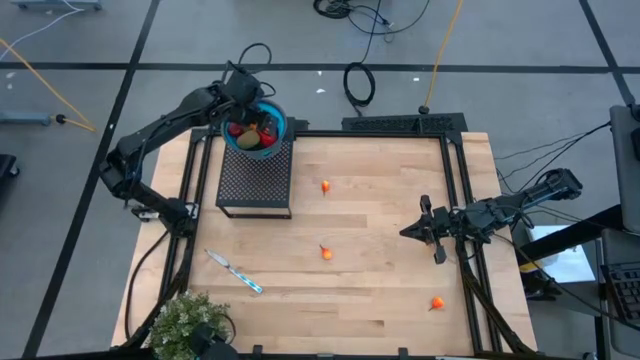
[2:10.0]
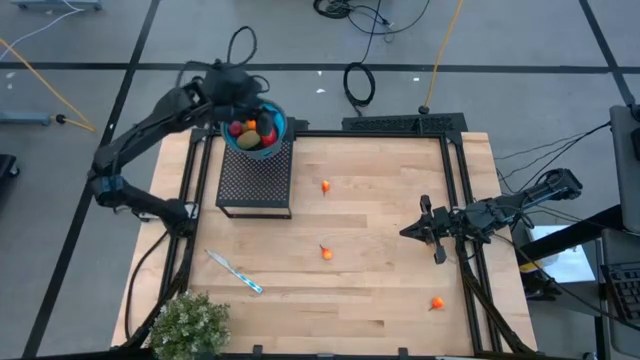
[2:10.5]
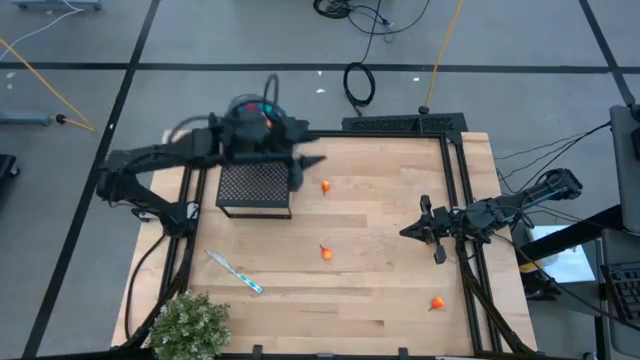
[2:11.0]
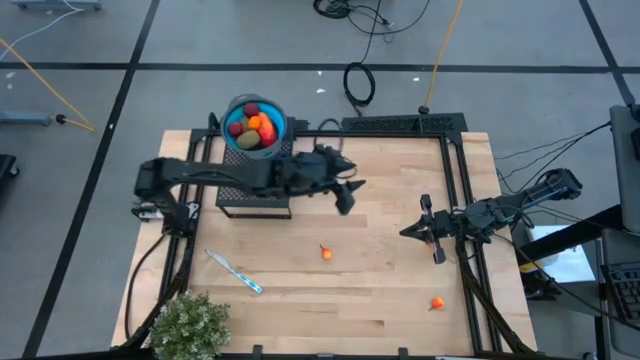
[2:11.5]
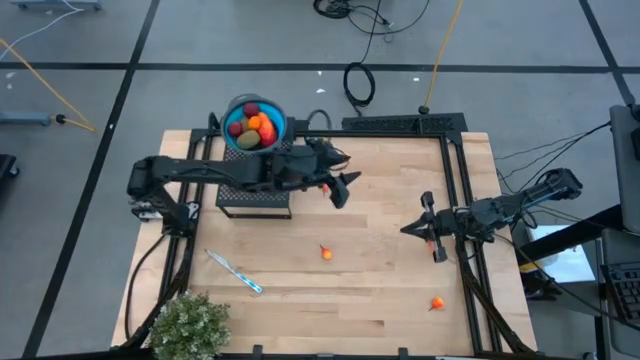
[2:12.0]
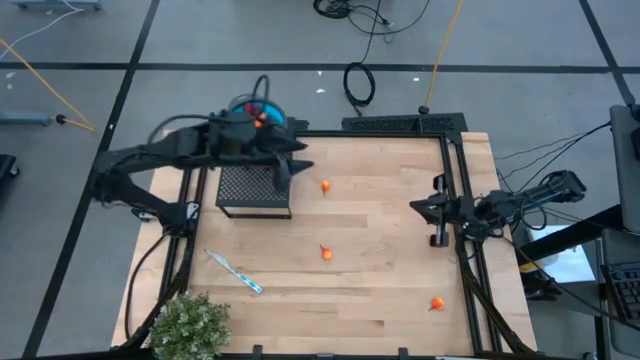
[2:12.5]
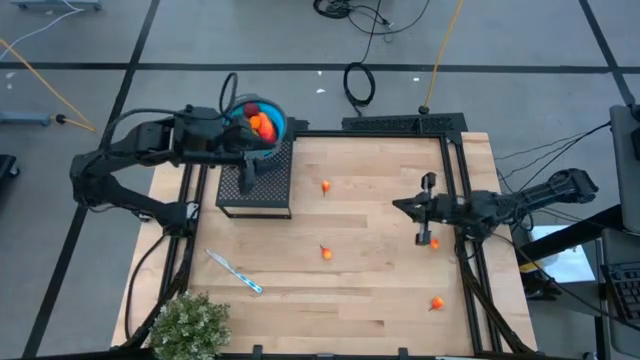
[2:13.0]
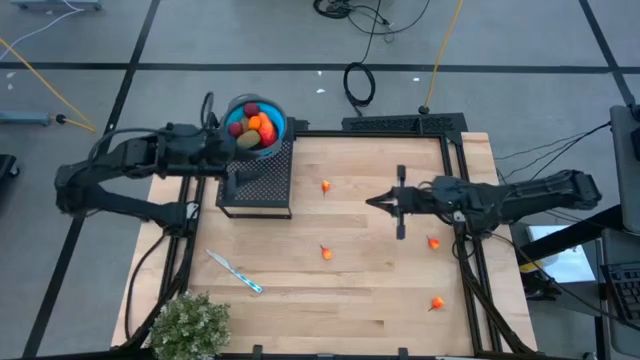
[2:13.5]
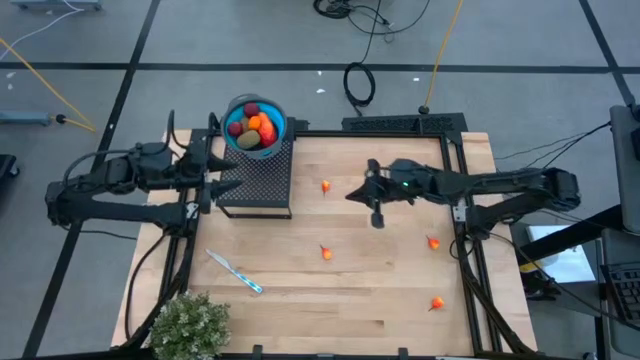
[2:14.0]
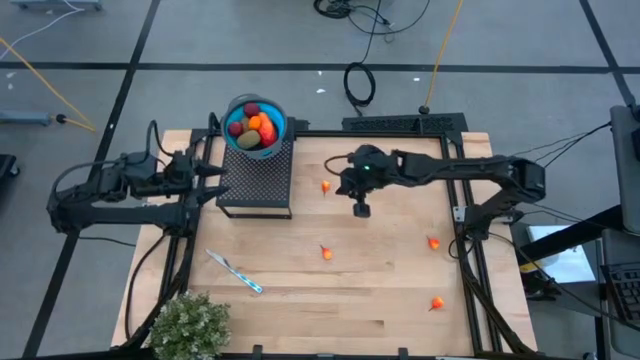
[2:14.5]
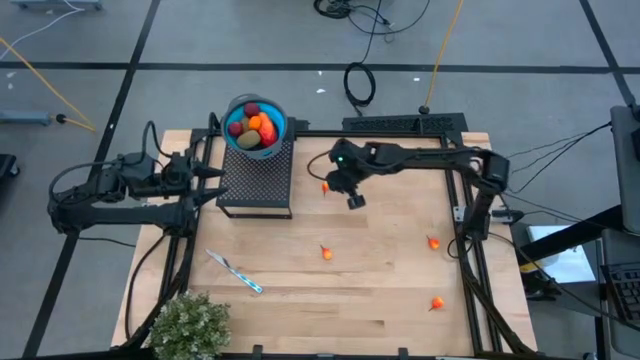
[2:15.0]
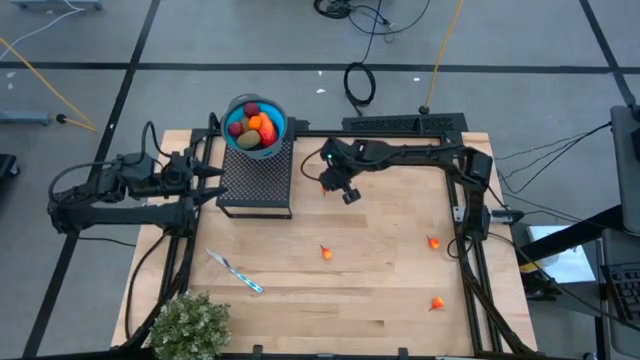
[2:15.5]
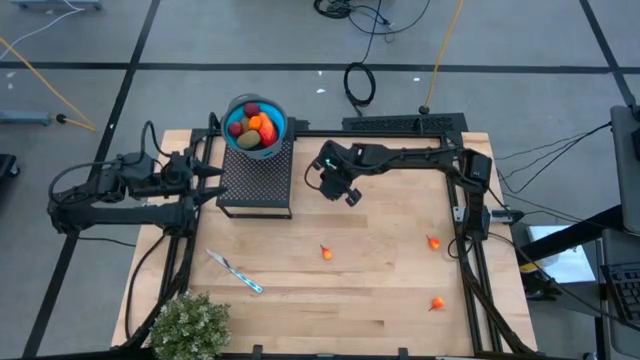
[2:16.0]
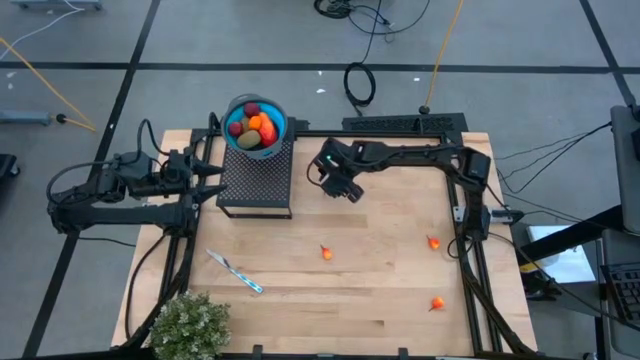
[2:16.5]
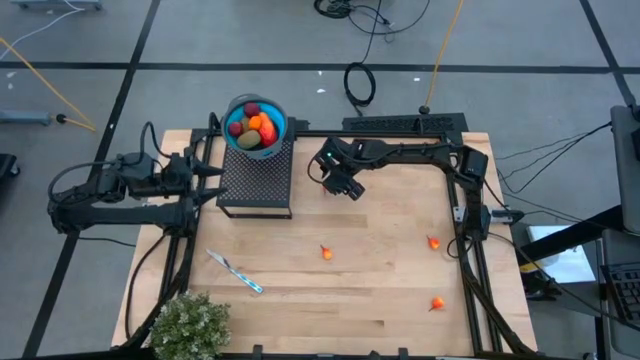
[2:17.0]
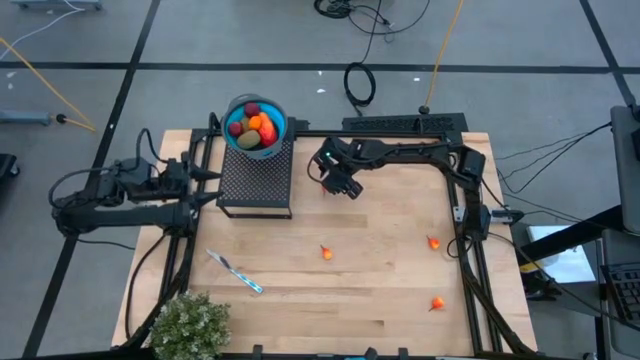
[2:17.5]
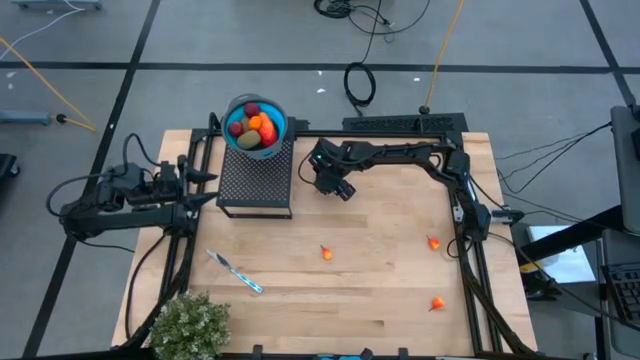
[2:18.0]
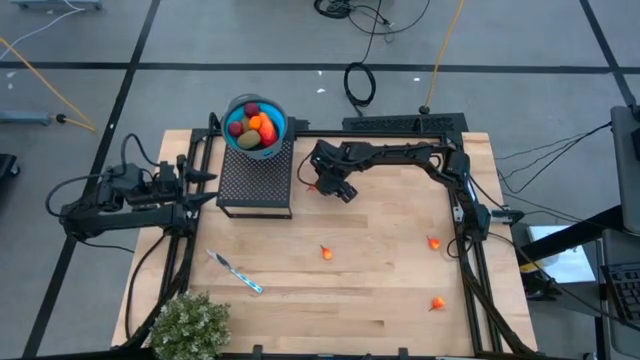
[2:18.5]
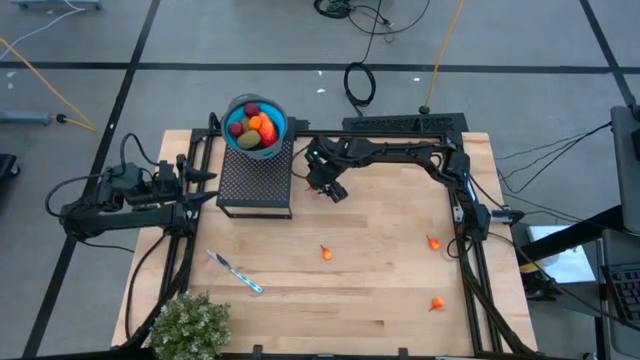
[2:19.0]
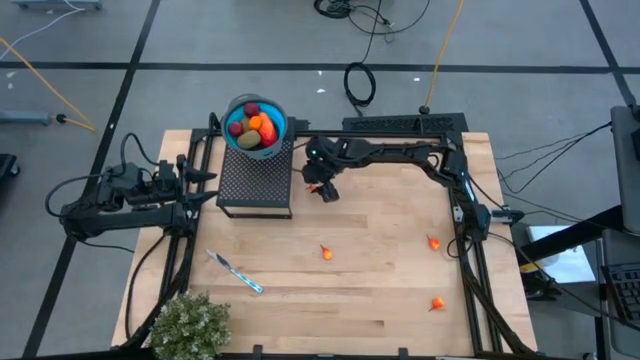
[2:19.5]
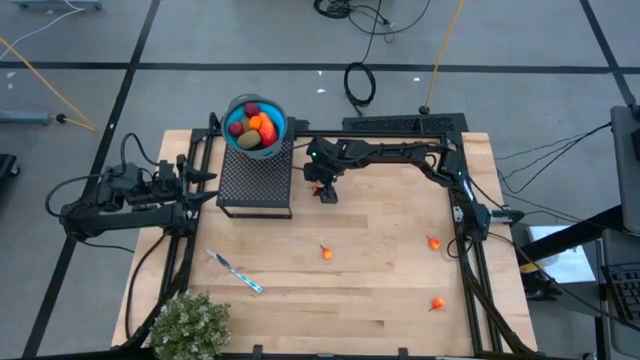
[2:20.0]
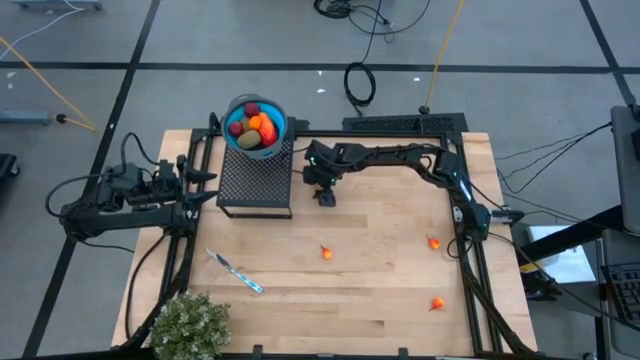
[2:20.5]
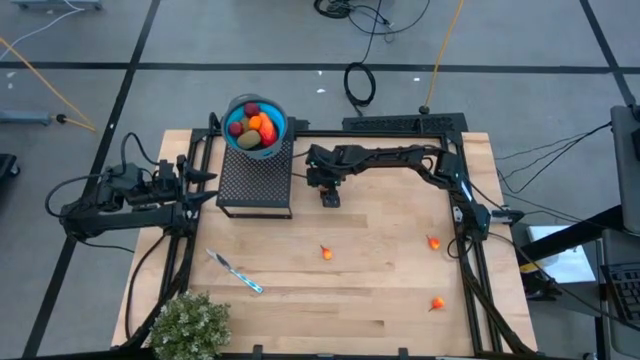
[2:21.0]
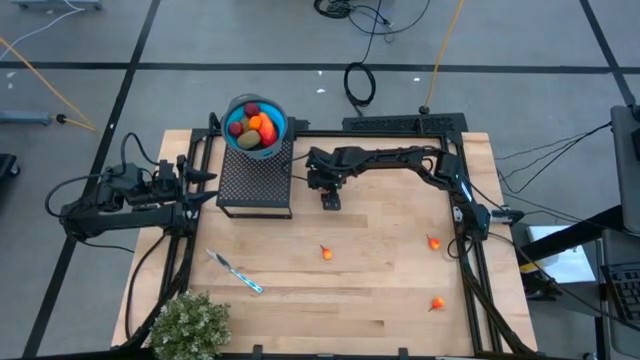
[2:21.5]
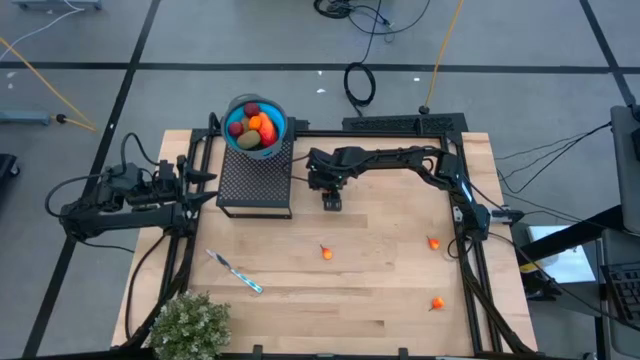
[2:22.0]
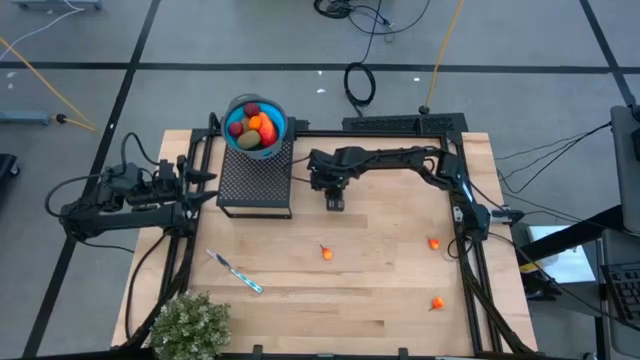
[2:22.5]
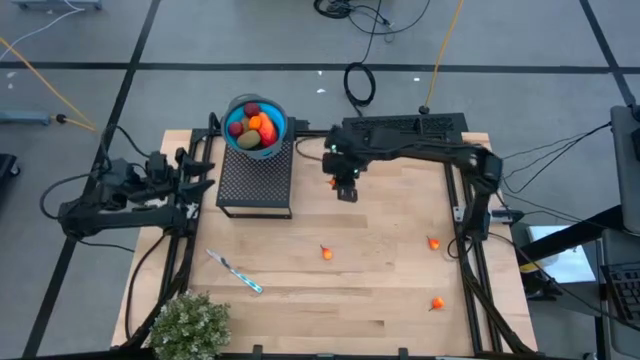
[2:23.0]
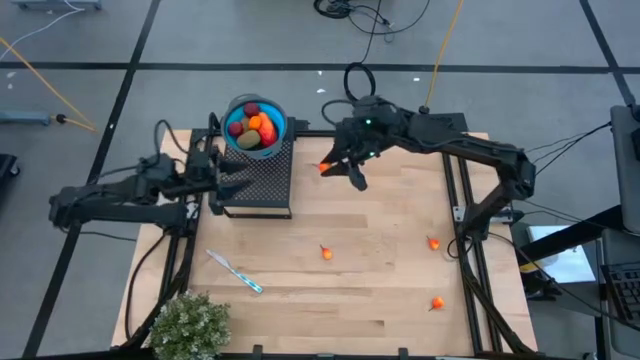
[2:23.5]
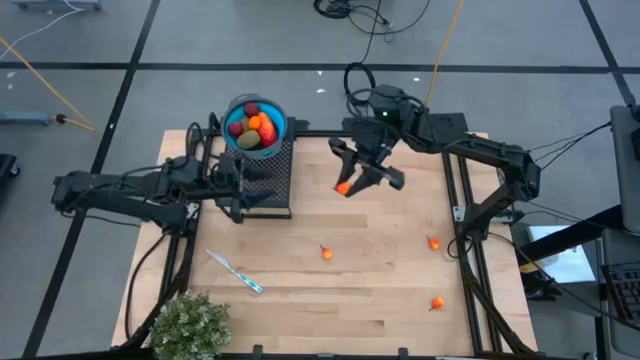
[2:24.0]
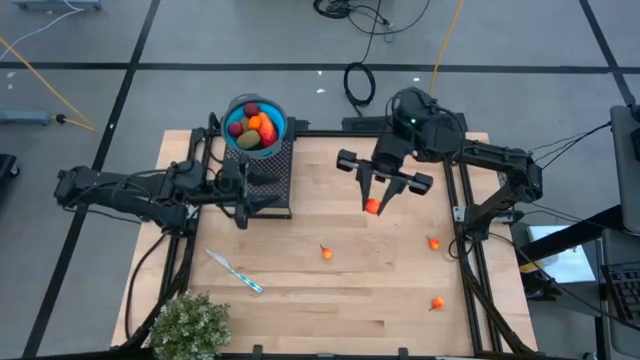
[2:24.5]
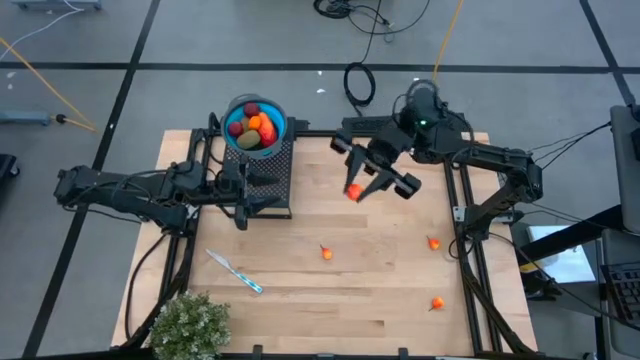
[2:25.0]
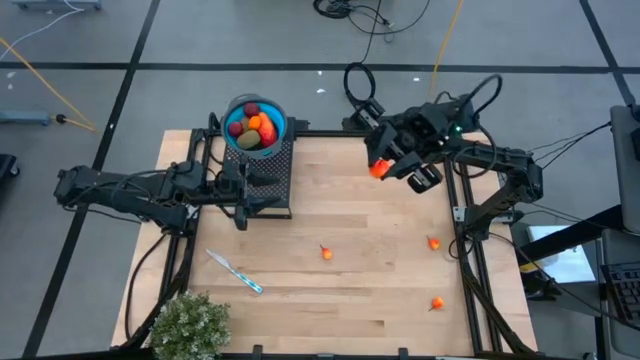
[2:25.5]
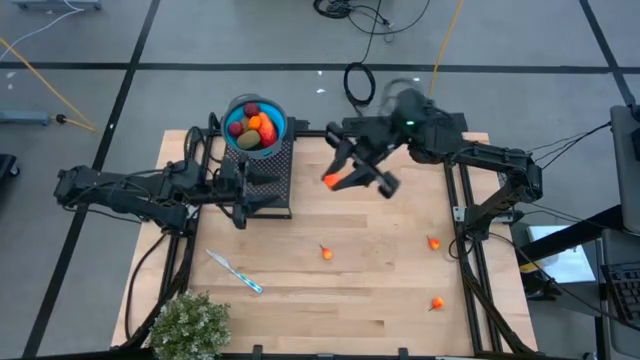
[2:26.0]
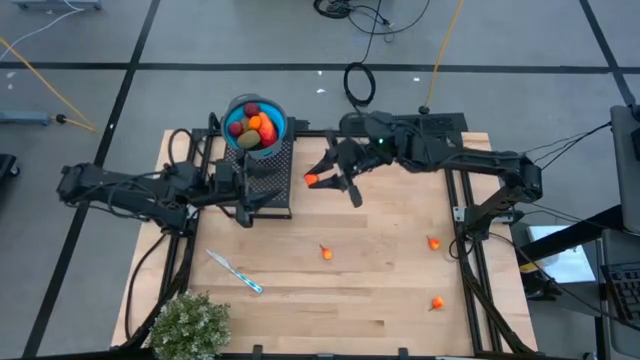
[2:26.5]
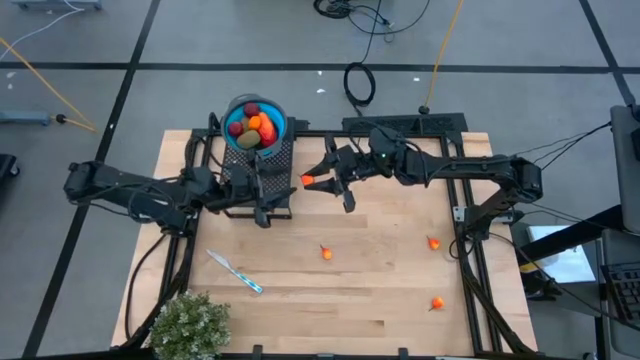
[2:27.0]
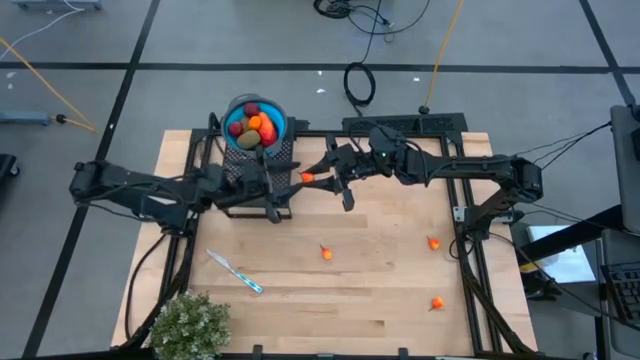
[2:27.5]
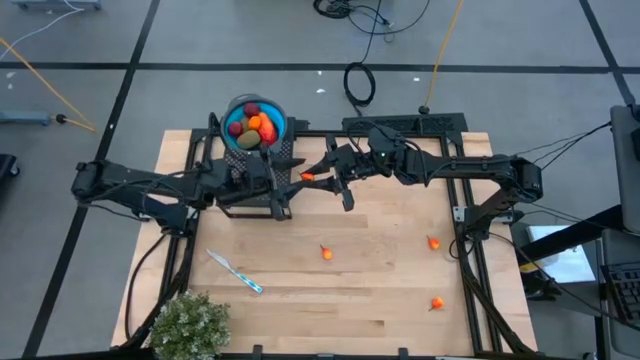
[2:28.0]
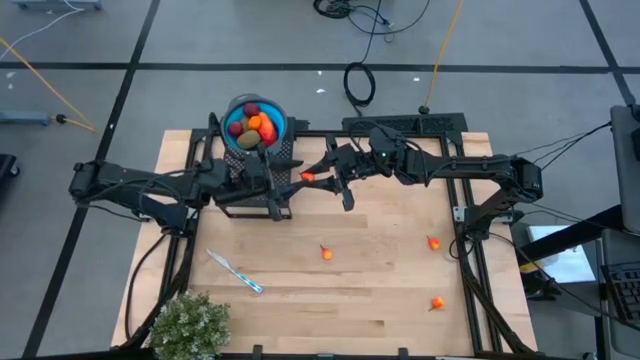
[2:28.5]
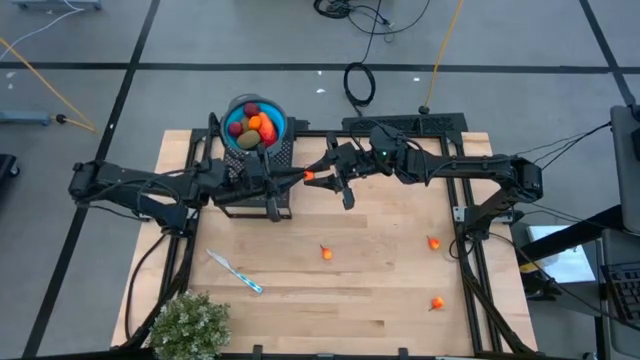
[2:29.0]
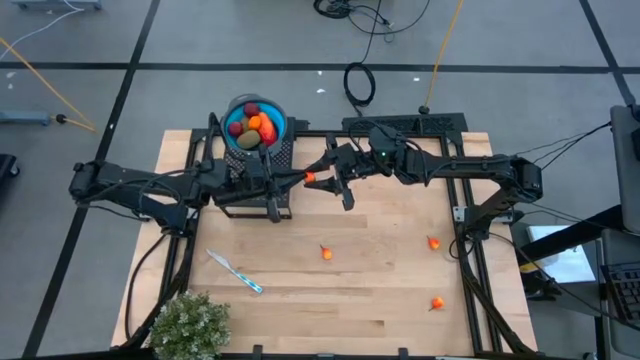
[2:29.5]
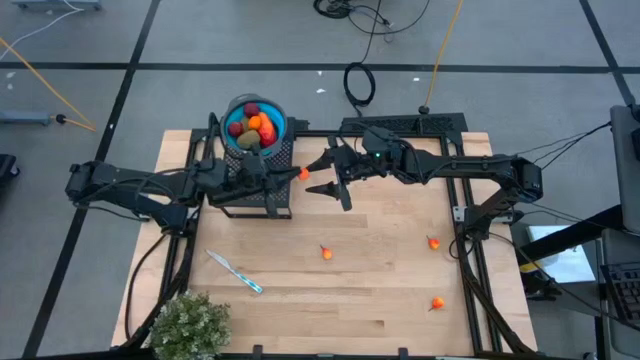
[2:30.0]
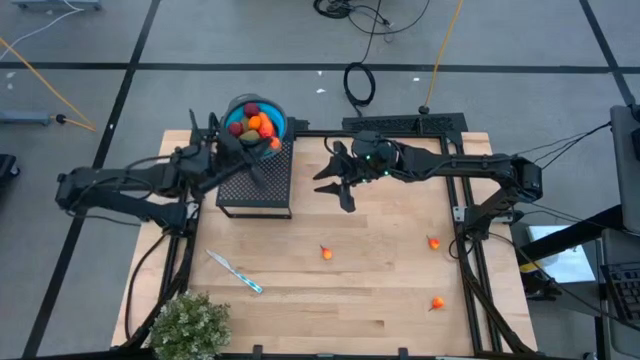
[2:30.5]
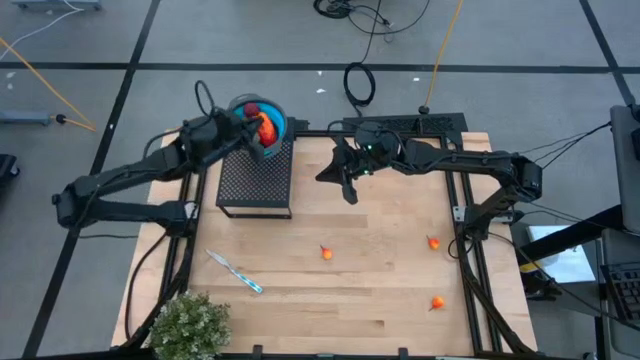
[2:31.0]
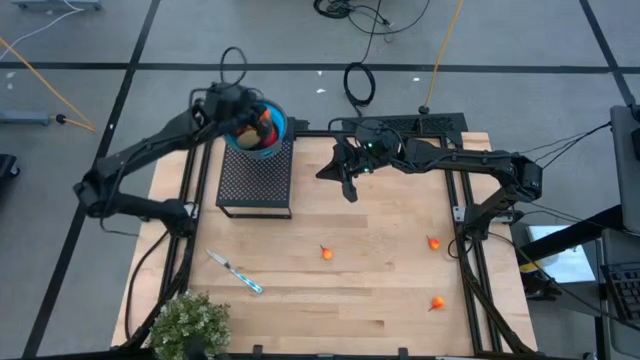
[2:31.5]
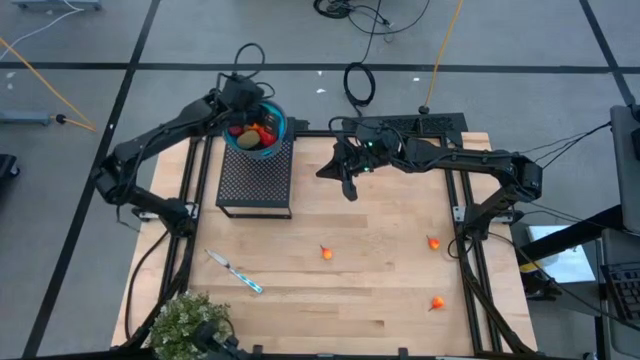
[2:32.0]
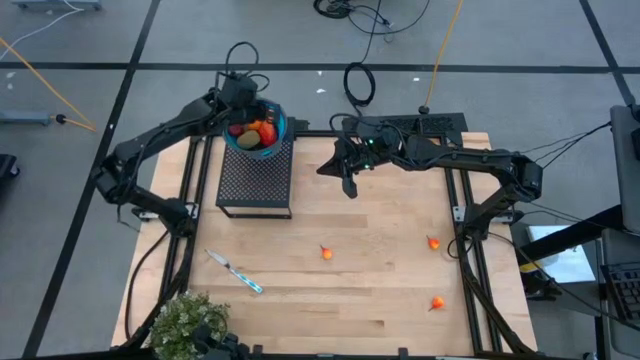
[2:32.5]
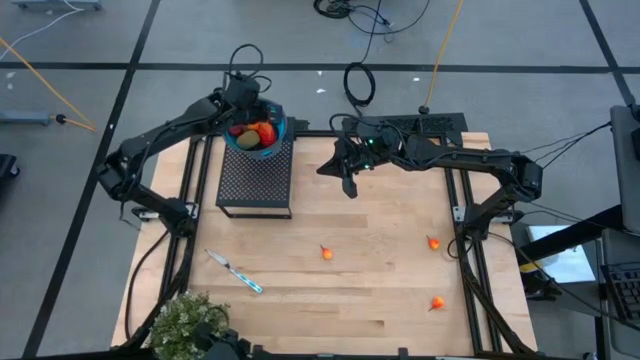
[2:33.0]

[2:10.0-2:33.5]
Task: Pick & Place Fruit
Put the pear into the blue strainer bowl on the shelf
